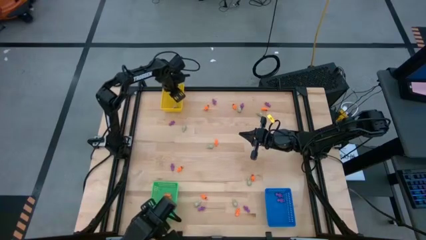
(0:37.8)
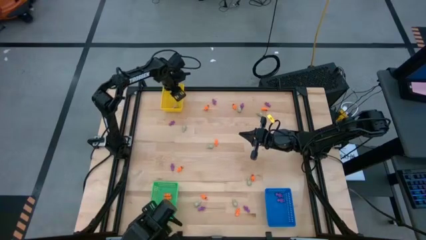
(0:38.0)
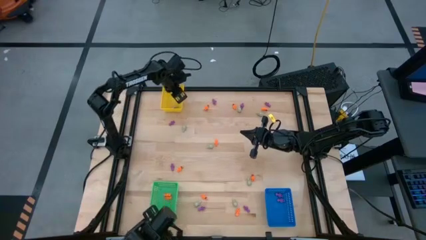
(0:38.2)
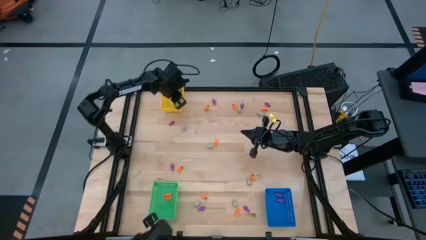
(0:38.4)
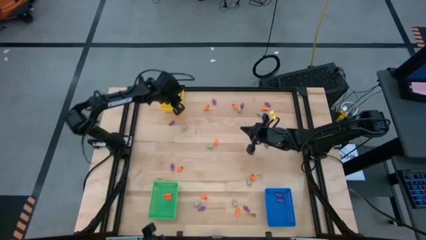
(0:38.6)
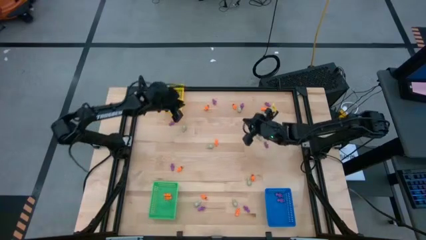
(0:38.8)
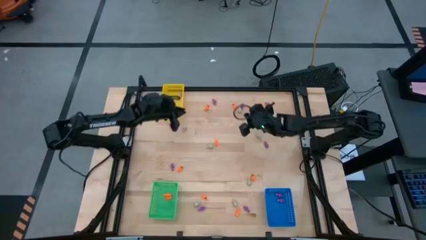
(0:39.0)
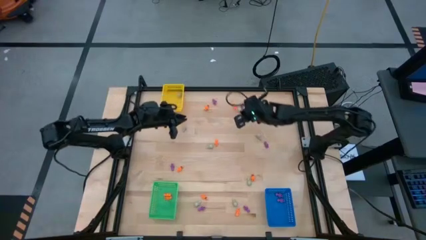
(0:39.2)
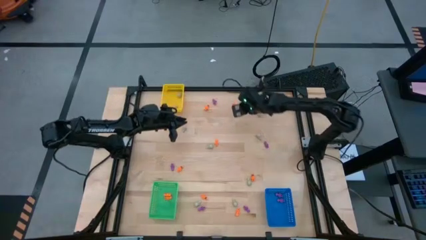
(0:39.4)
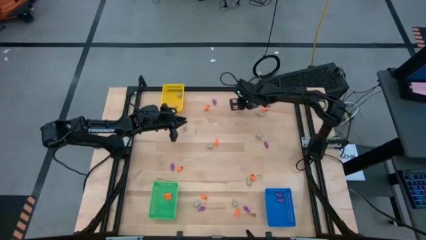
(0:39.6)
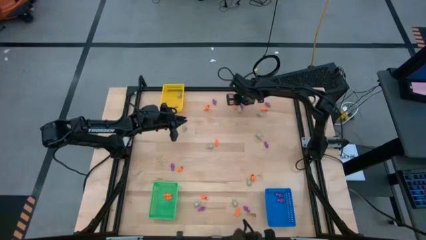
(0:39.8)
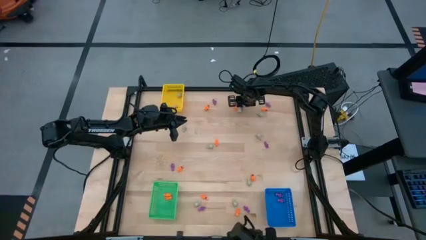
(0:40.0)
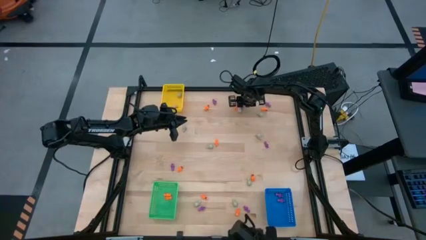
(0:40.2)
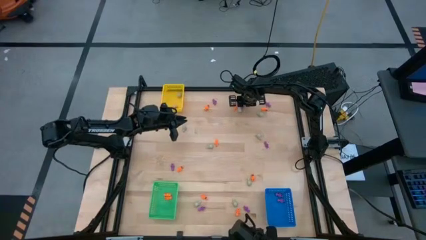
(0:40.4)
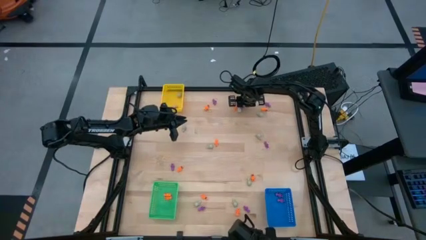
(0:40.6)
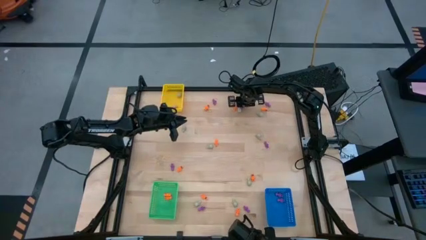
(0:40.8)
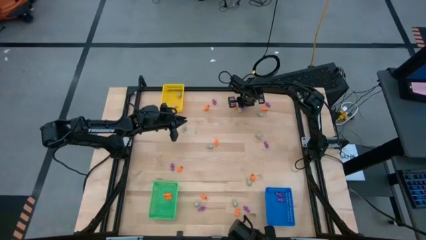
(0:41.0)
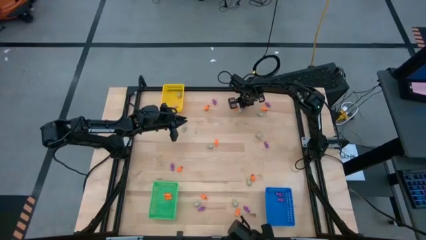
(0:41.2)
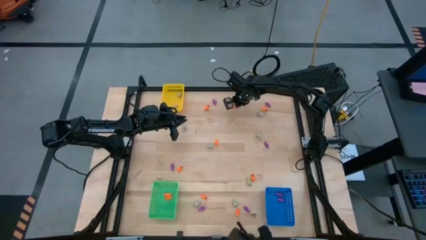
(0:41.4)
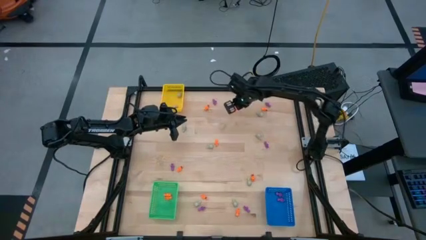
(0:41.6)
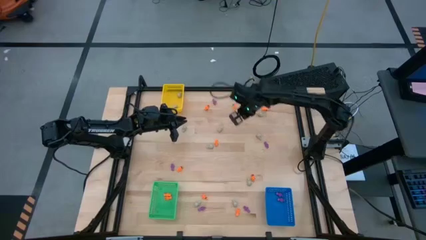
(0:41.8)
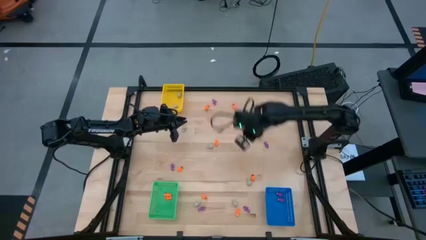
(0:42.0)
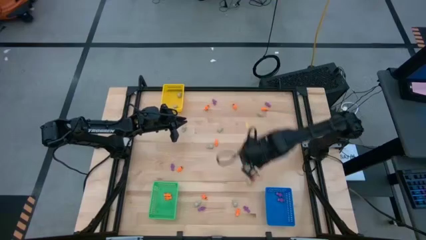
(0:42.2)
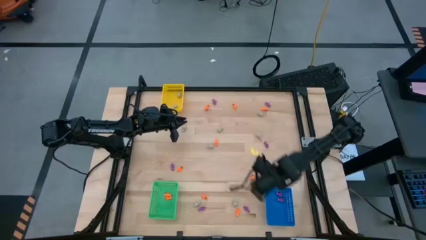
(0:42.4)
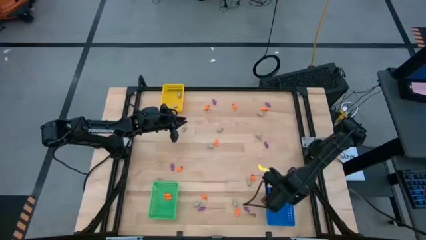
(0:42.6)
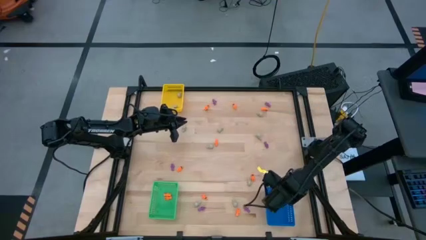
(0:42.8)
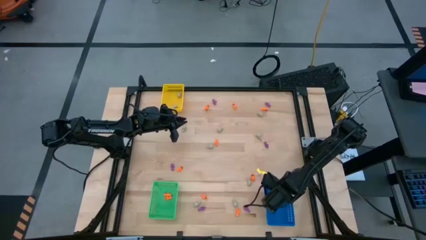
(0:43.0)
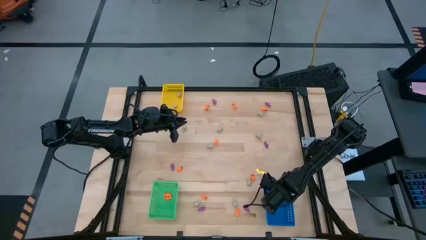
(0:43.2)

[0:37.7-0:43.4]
Task: Sort Halloween decoration
Put the purple skeleton toy into the blue bin

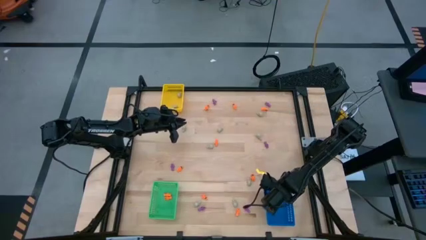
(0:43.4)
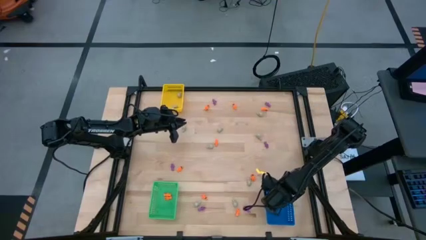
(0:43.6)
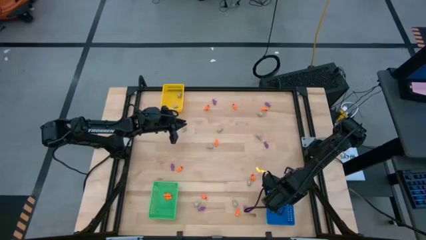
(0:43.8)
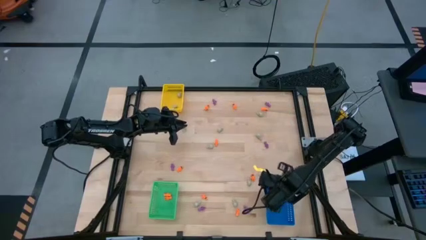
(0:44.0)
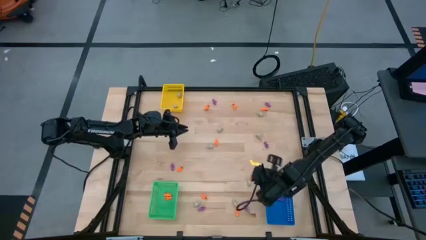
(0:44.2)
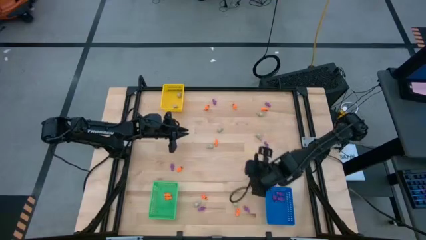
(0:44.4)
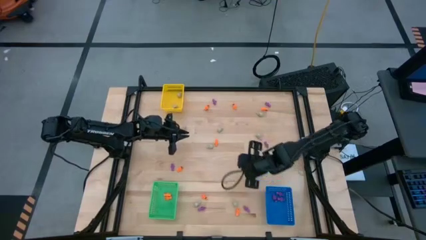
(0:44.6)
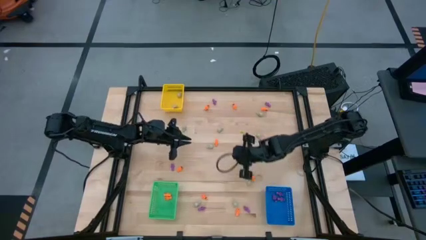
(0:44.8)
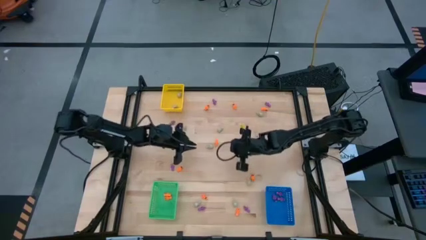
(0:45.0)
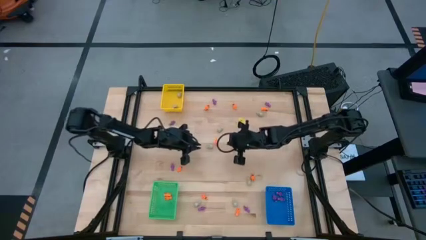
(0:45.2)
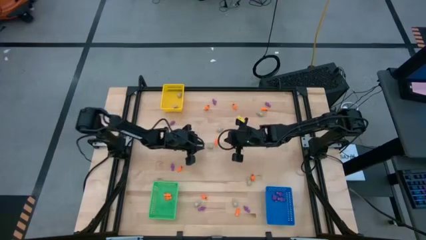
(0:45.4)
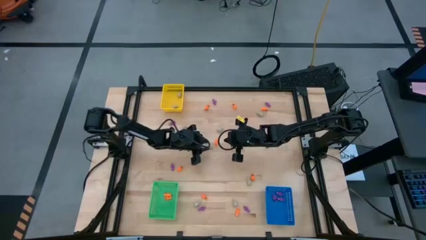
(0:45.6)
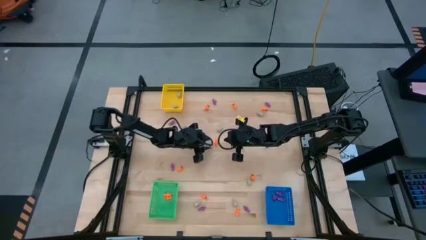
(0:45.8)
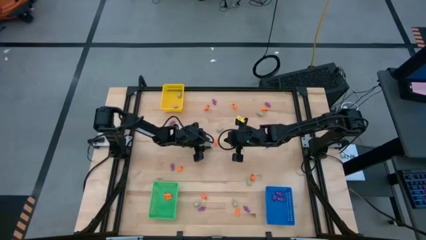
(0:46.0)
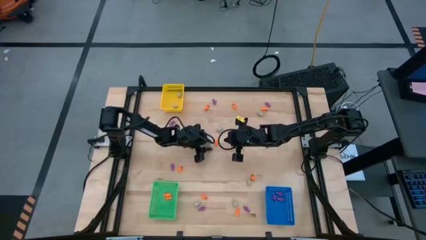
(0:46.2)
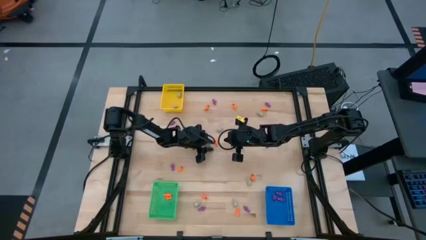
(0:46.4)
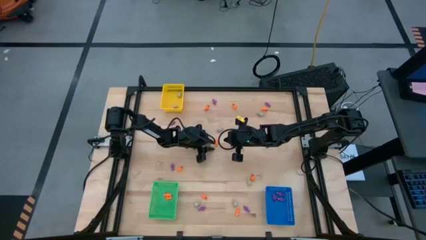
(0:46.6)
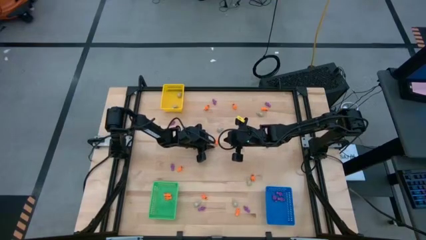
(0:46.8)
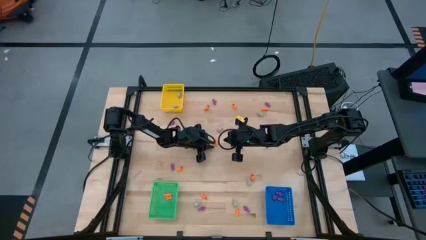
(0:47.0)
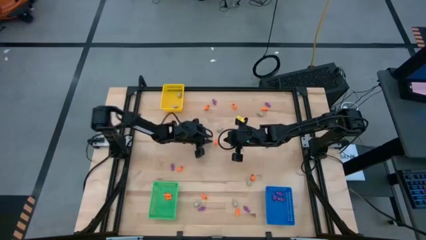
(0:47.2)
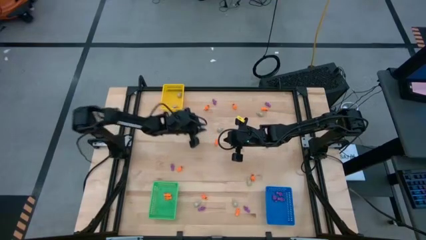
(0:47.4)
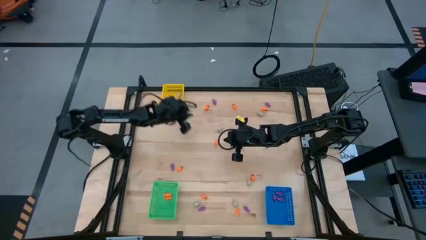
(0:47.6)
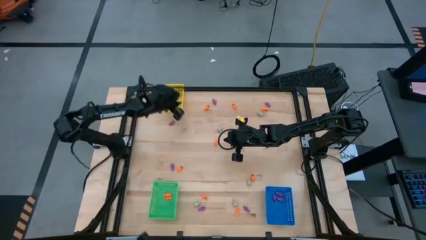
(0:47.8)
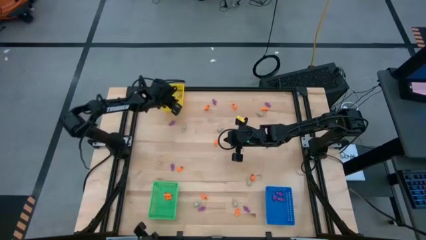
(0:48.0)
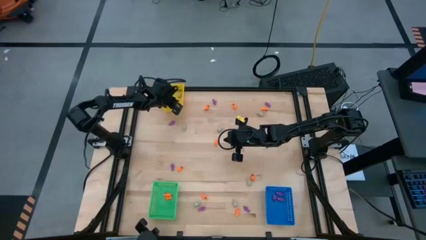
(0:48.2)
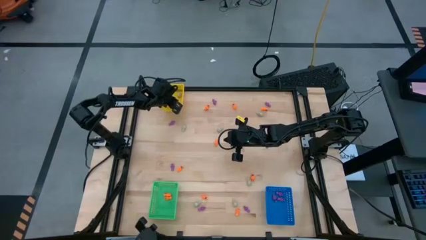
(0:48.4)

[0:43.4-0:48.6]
Put the gray skull toy into the yellow bin

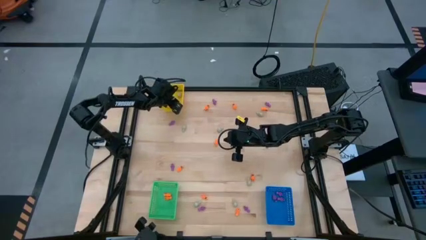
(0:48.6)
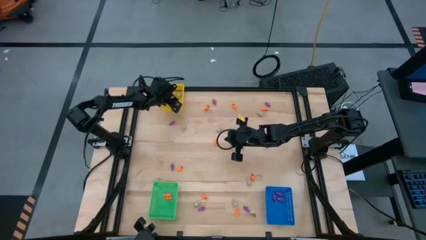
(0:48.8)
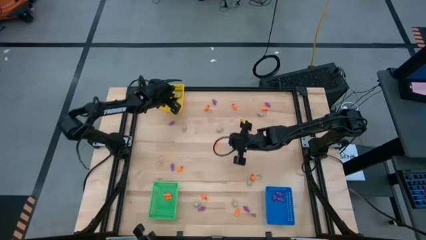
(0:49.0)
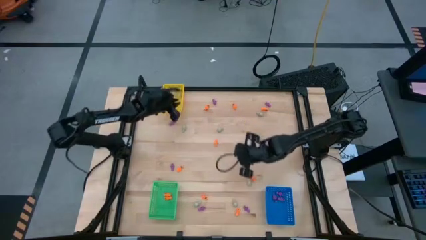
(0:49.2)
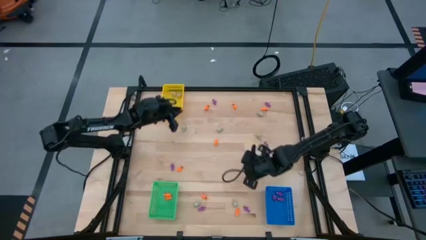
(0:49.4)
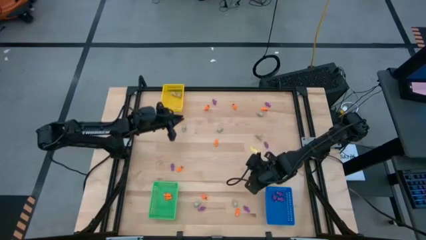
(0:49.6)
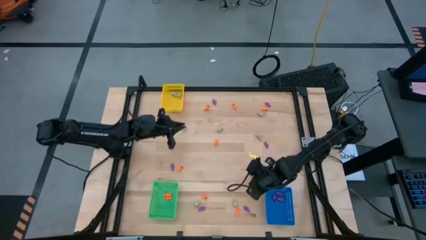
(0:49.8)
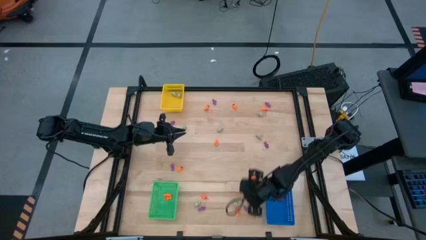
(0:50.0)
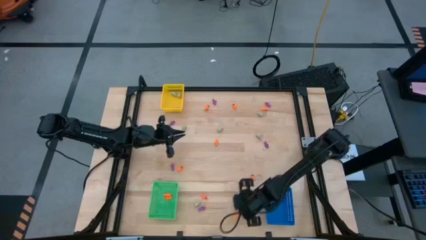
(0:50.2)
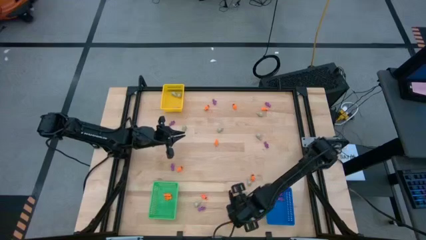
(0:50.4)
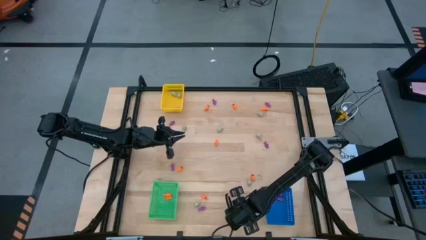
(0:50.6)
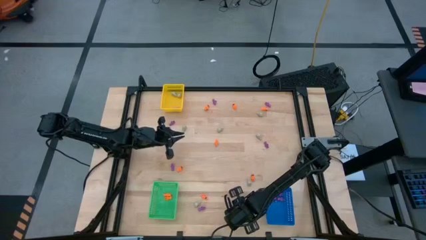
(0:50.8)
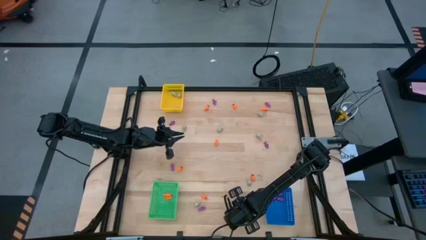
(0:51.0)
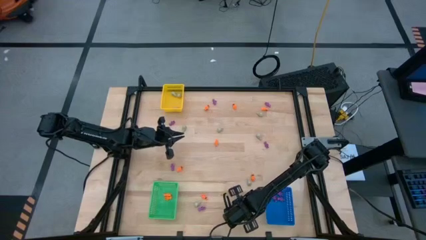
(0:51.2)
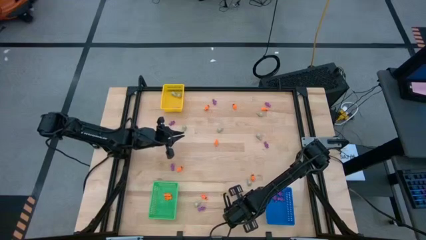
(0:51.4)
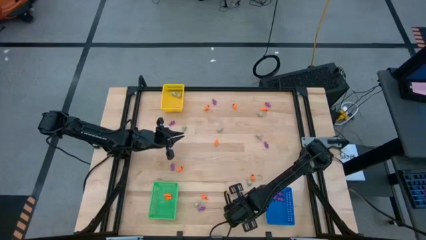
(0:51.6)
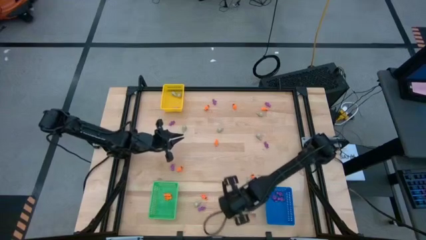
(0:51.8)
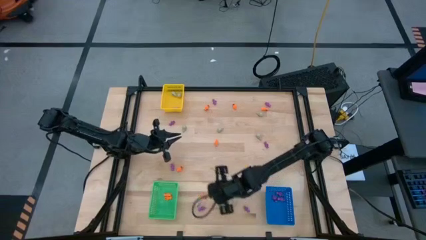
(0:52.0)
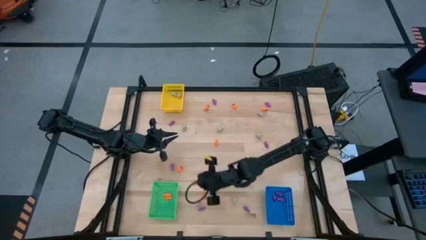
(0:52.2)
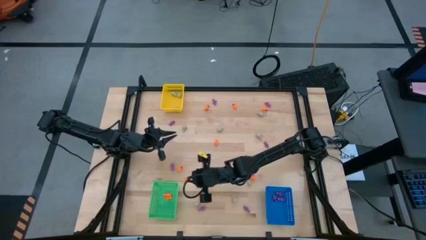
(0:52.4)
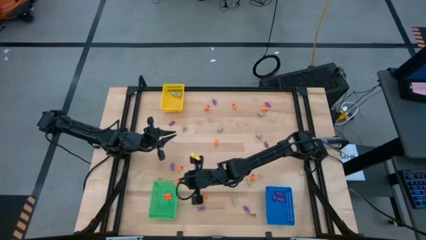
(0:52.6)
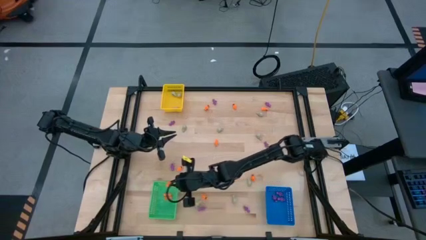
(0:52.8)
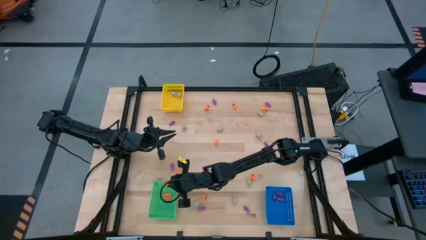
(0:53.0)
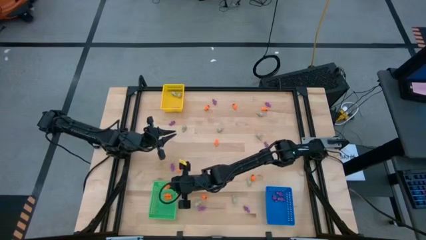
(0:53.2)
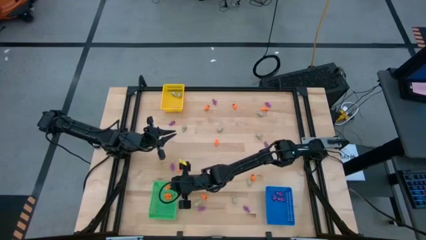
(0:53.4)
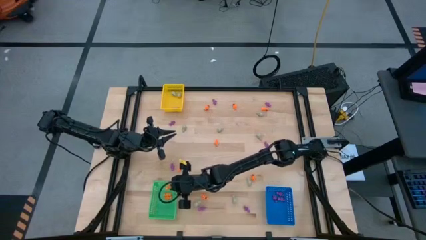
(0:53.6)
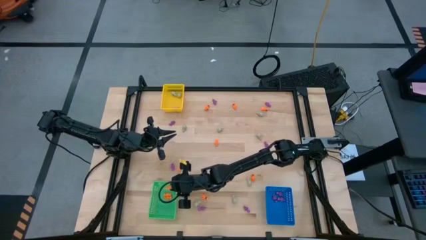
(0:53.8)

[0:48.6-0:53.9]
Put the orange skeleton toy into the green bin

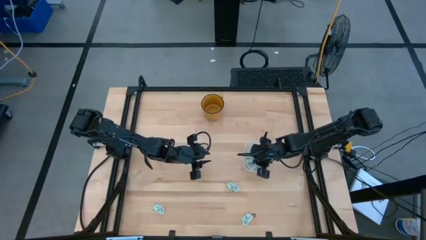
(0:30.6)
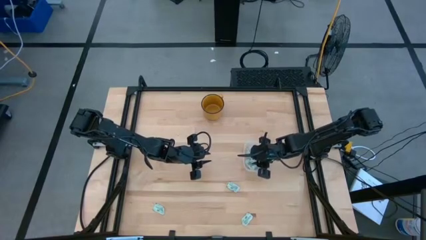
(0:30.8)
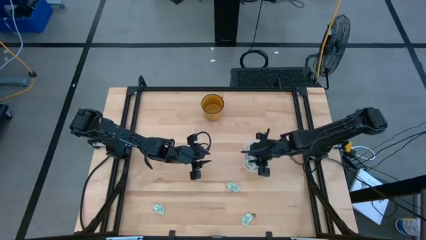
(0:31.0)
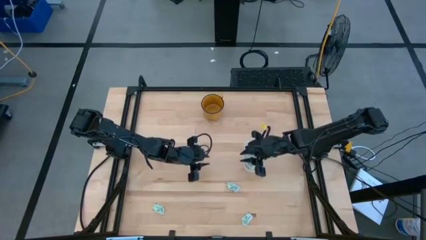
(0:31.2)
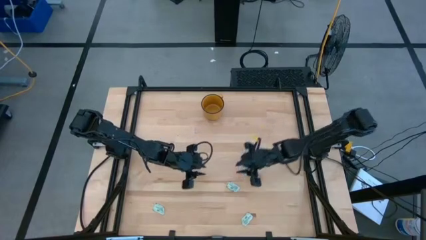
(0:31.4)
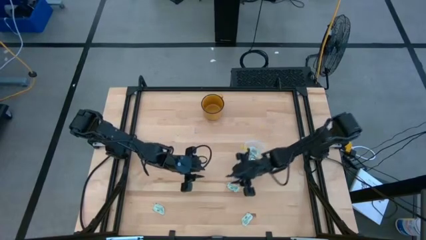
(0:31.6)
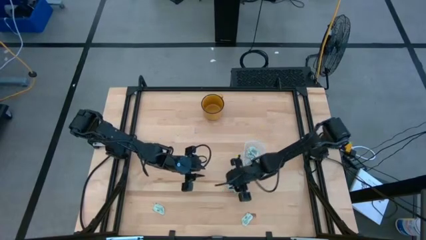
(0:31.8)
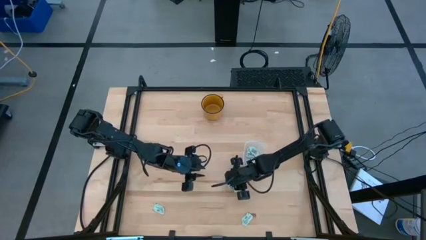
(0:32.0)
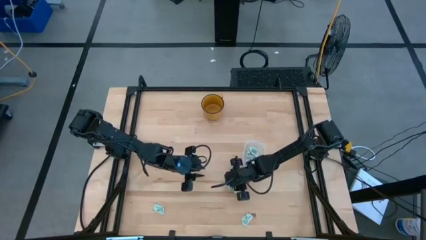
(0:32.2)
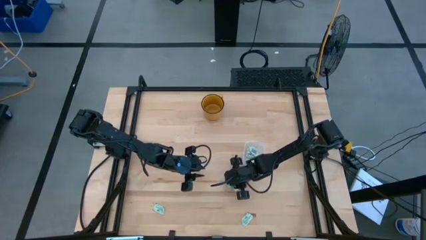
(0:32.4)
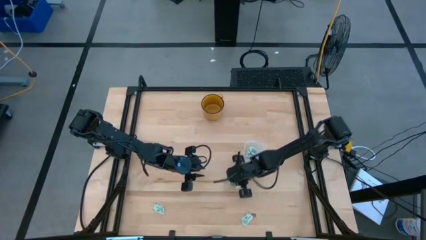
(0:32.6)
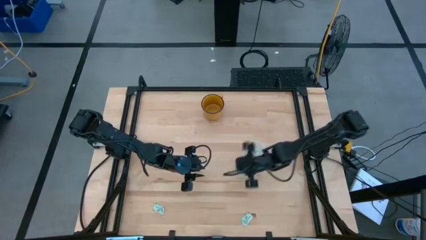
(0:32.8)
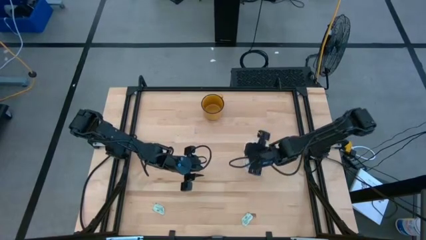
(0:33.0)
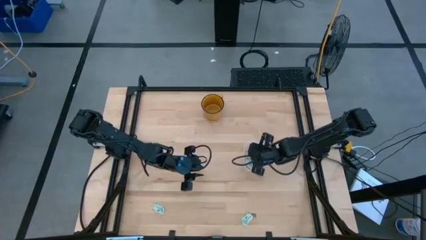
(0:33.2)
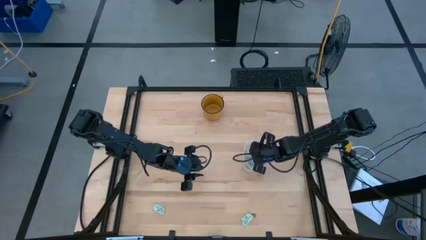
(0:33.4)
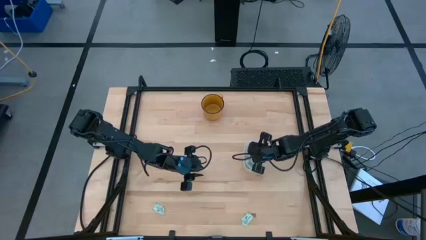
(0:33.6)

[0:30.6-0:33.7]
Task: Pick and place Stevia / Truvia into bins
Put the white stevia packet into the transparent bin
